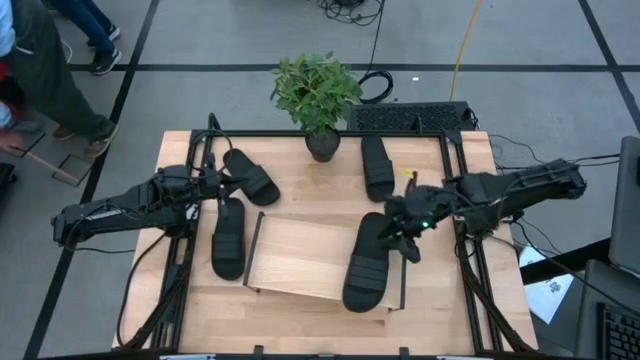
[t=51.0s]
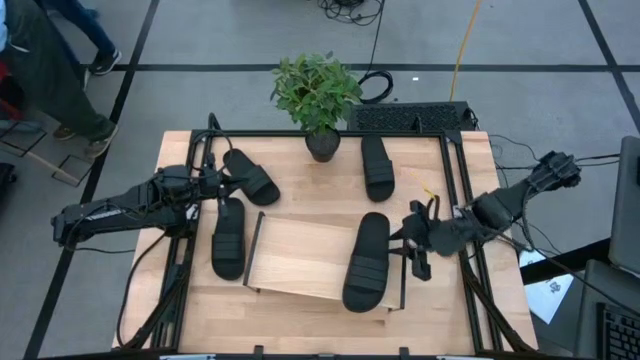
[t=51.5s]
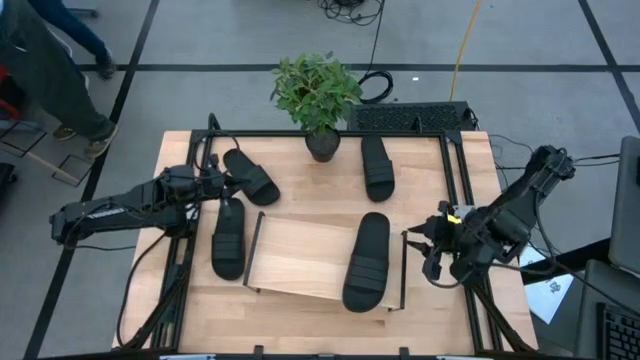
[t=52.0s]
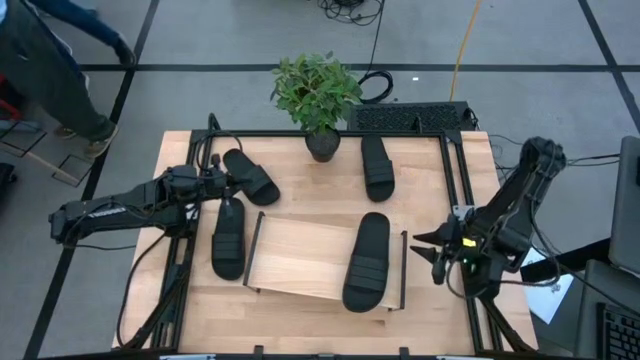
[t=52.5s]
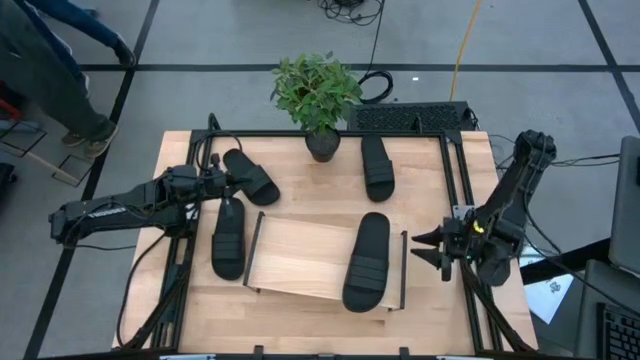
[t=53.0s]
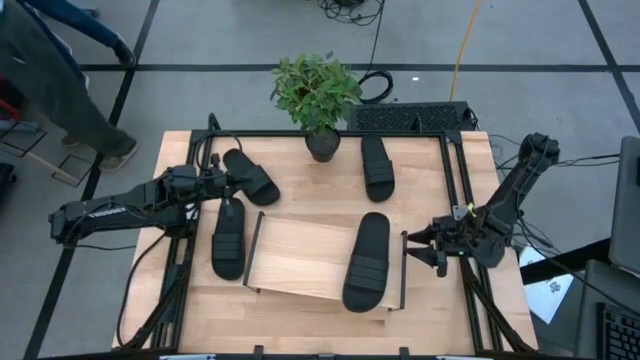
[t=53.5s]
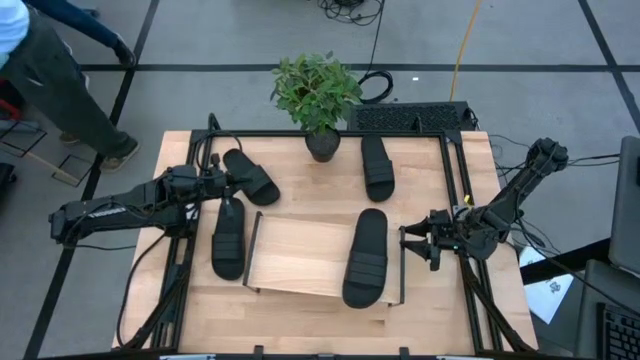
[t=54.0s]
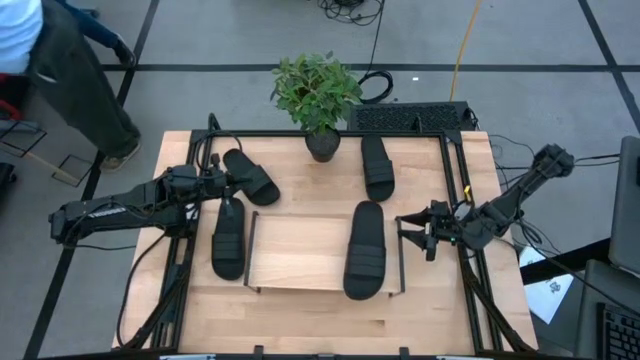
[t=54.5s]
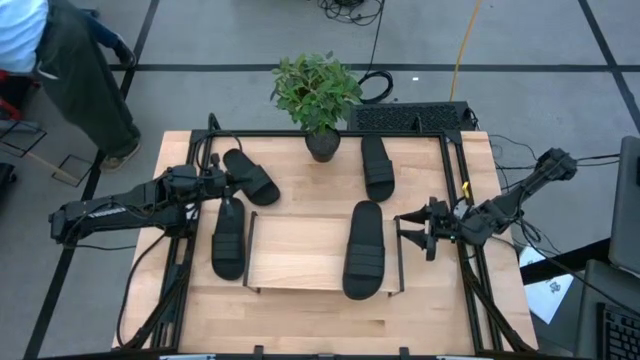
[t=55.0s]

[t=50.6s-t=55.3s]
Task: Pick and place slides into the shelf
Adjust the shelf

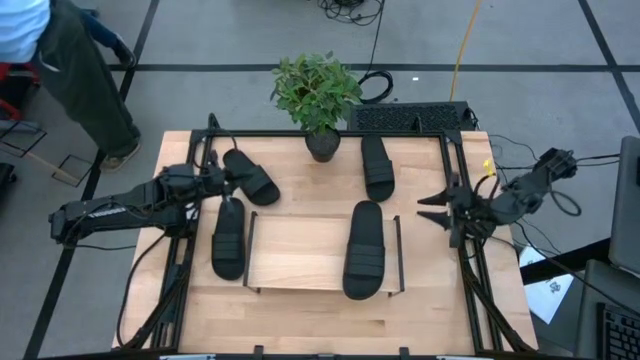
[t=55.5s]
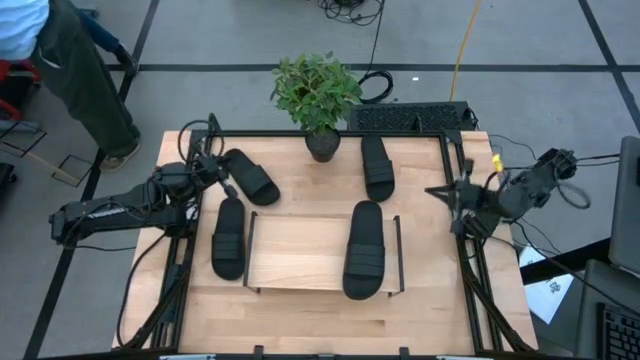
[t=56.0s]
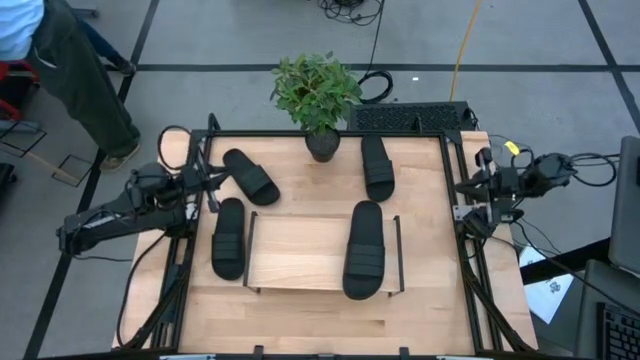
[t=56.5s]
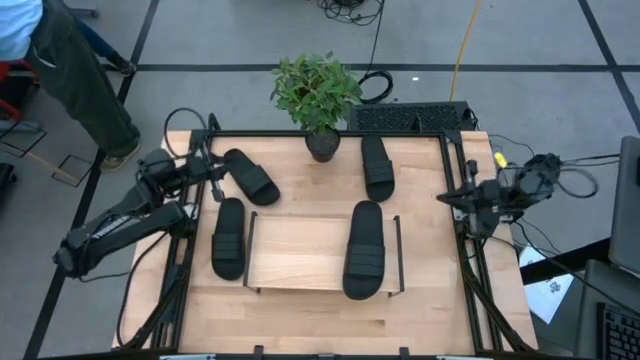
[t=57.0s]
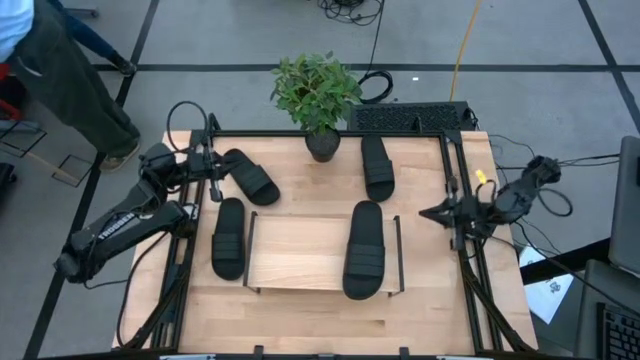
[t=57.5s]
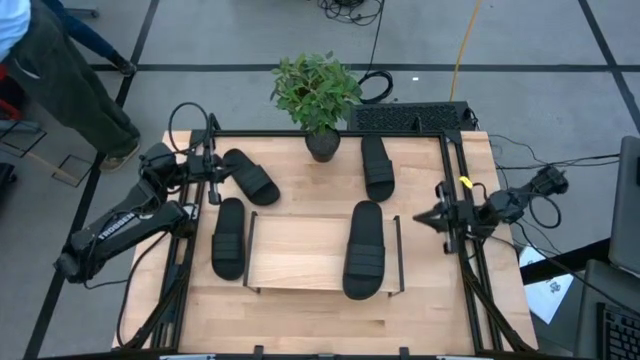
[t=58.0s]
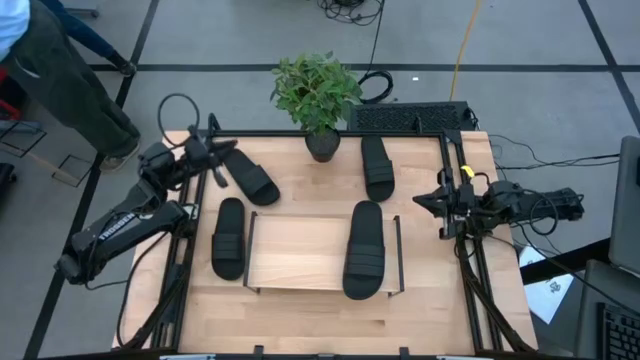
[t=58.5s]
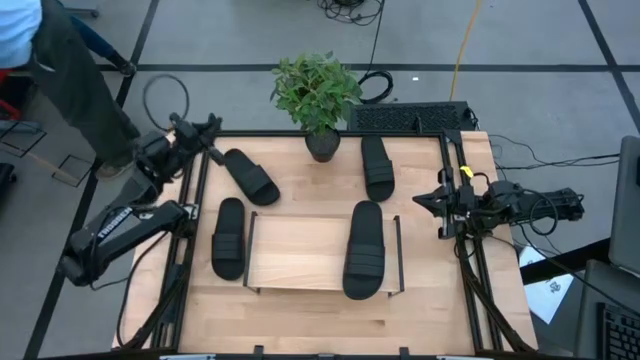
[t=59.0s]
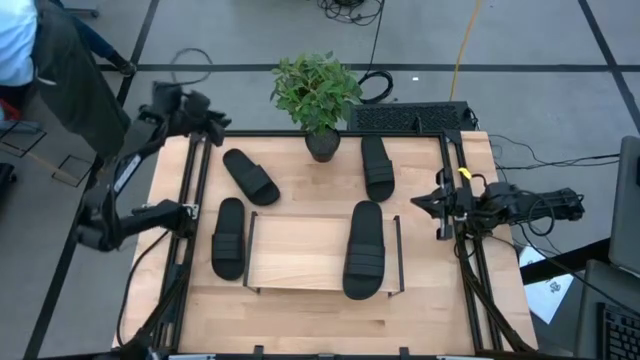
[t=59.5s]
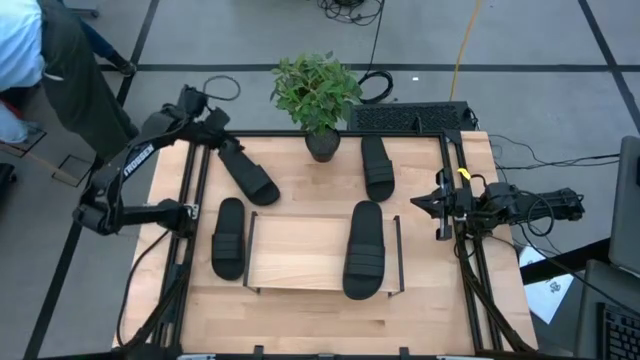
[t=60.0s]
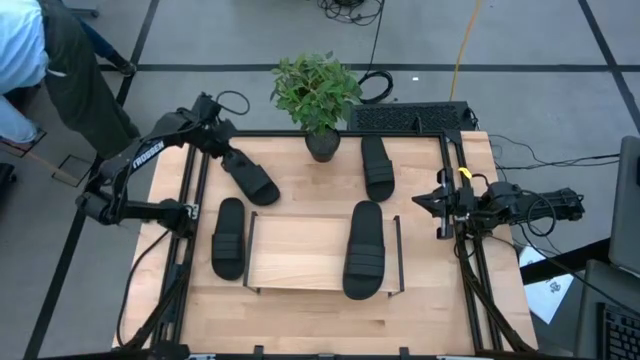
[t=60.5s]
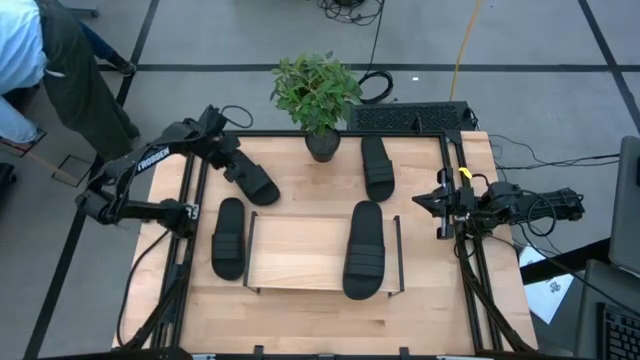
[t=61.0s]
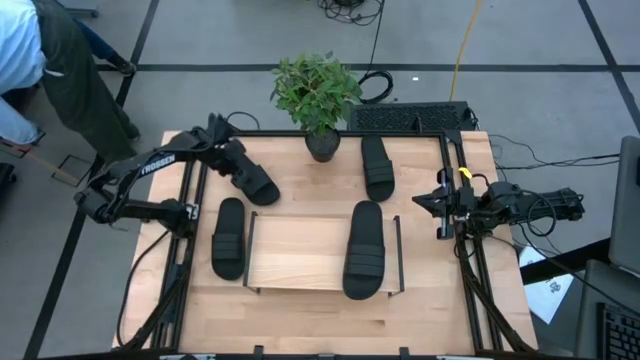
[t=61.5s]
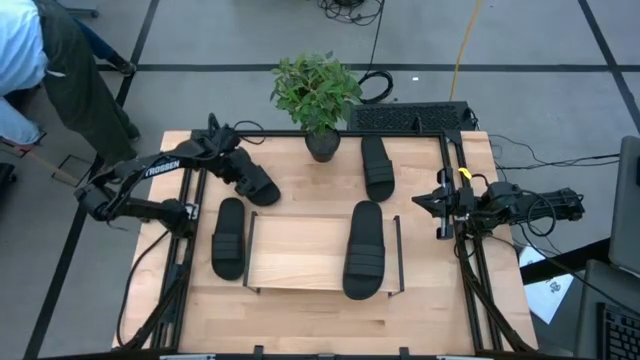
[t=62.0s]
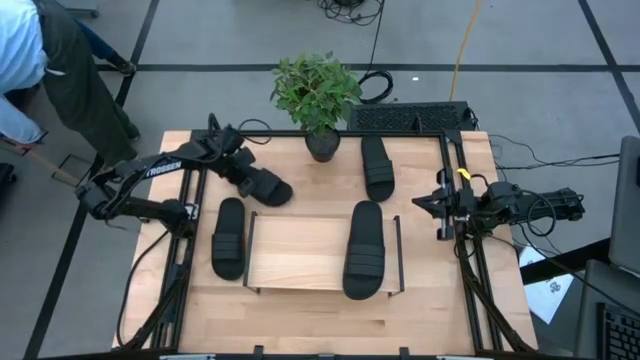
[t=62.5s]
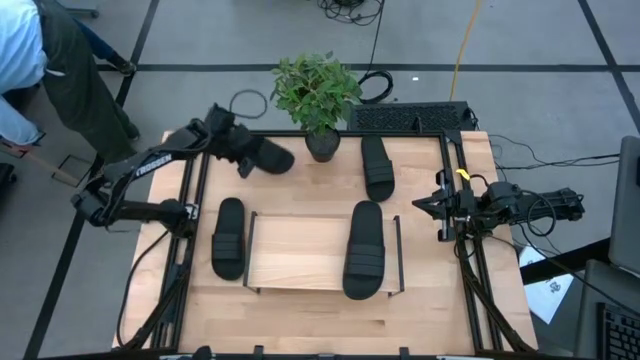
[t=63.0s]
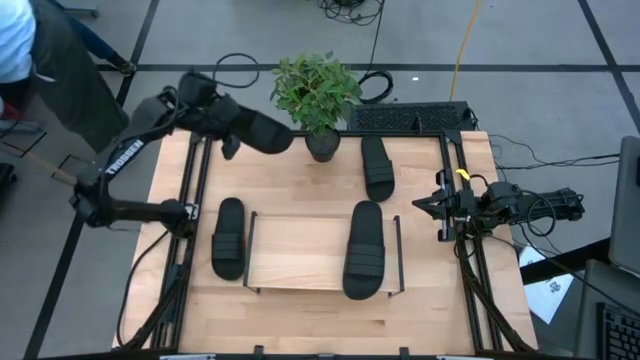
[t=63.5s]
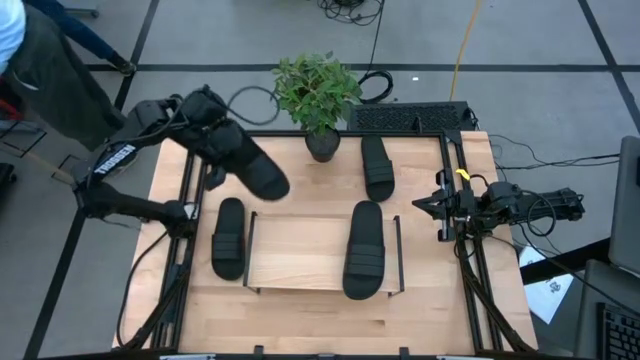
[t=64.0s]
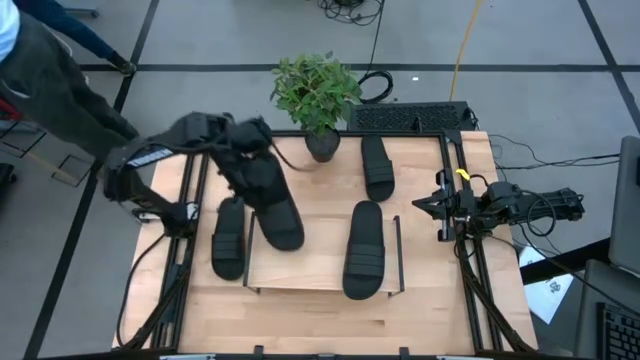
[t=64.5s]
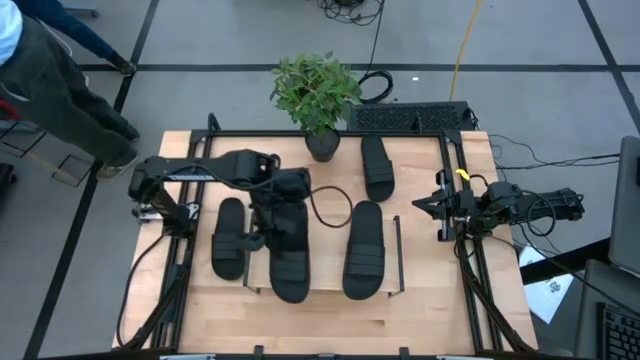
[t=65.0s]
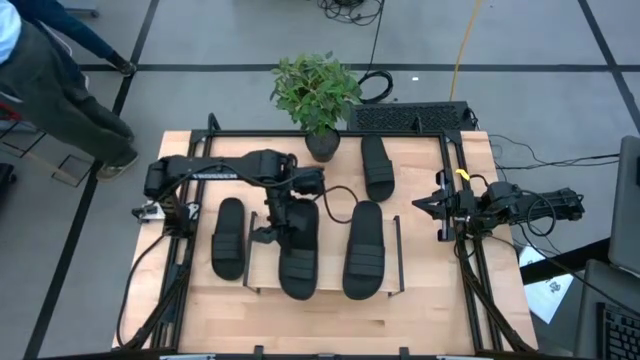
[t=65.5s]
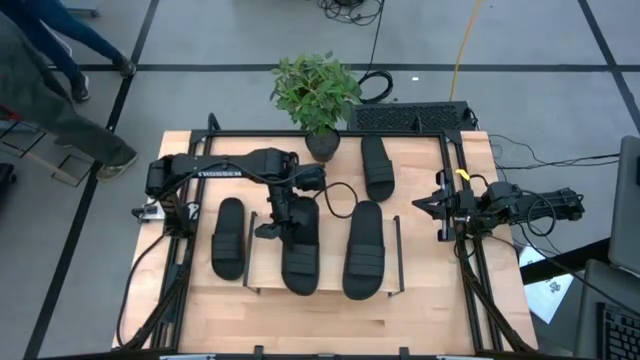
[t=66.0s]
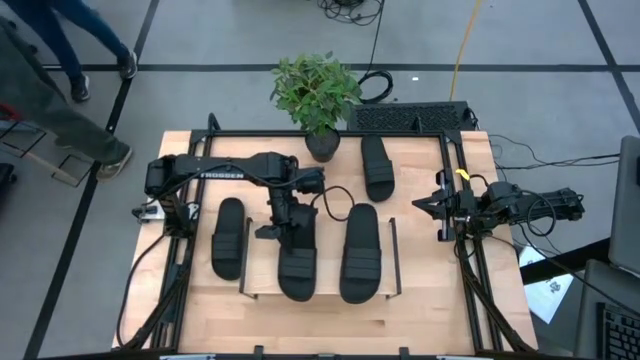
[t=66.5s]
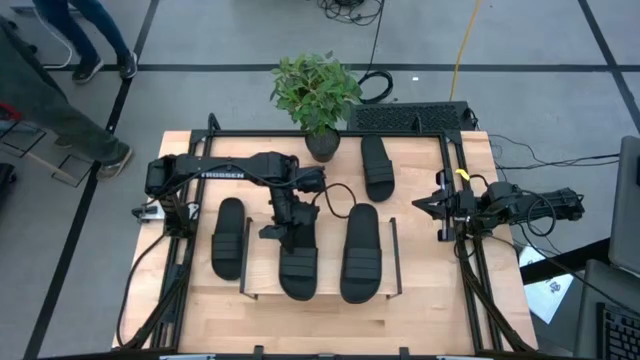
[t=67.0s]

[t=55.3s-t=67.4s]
Put the black slipper on the shelf

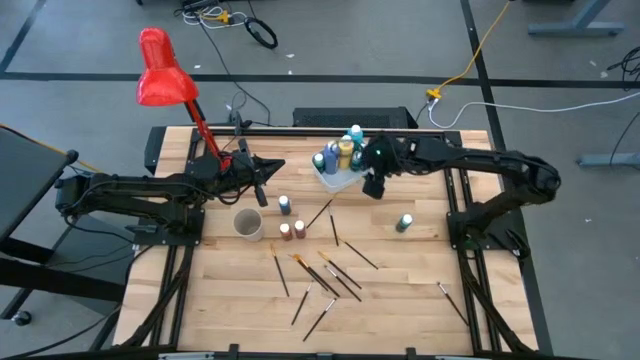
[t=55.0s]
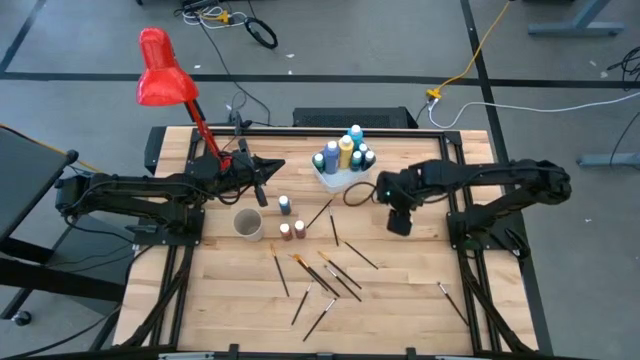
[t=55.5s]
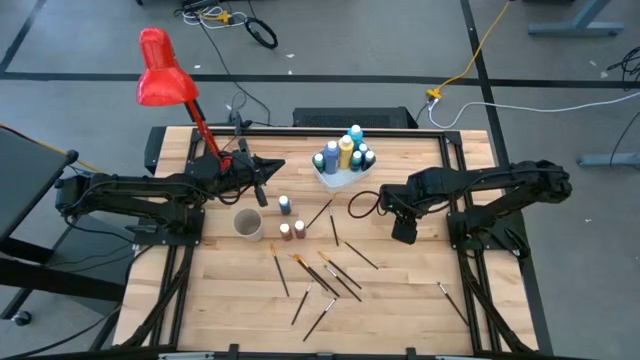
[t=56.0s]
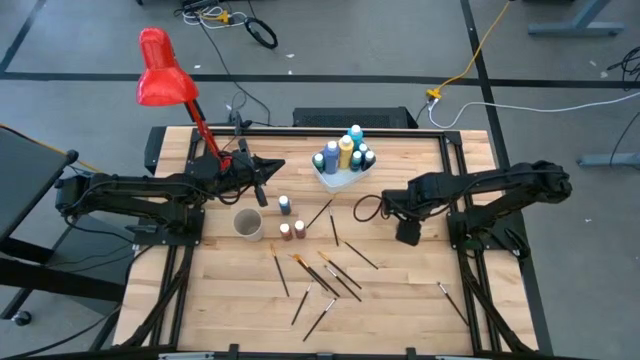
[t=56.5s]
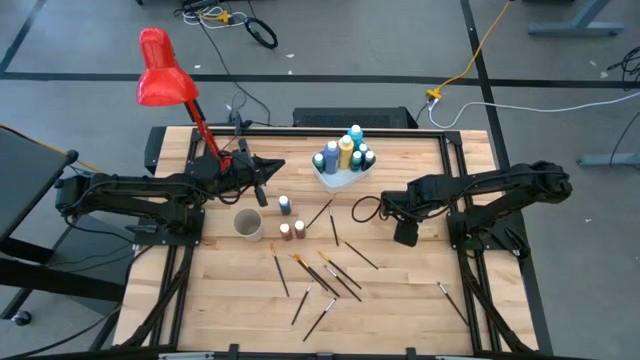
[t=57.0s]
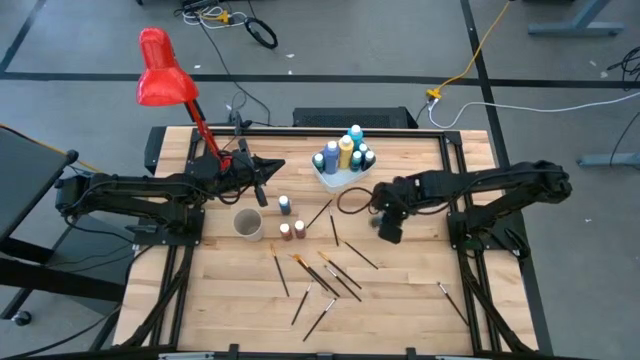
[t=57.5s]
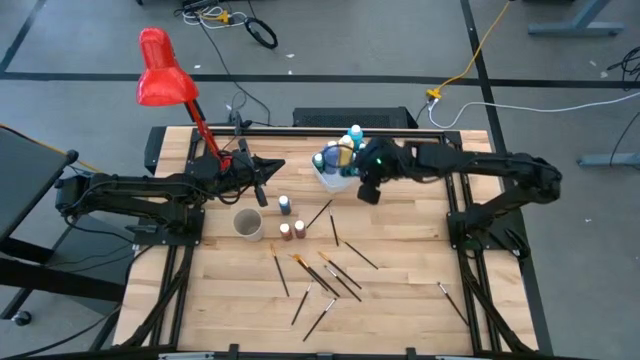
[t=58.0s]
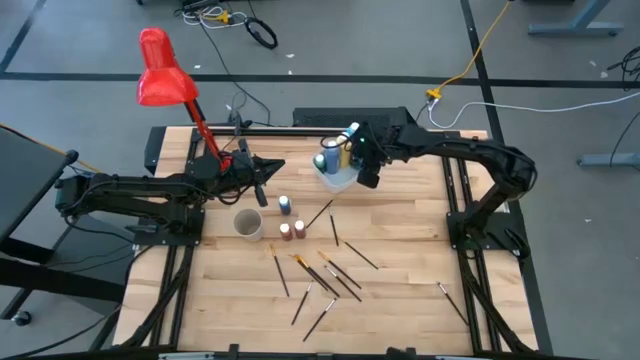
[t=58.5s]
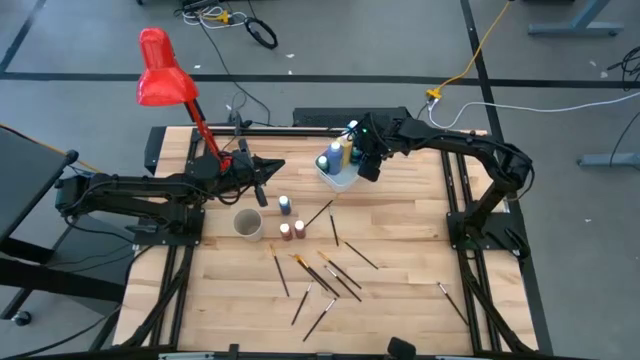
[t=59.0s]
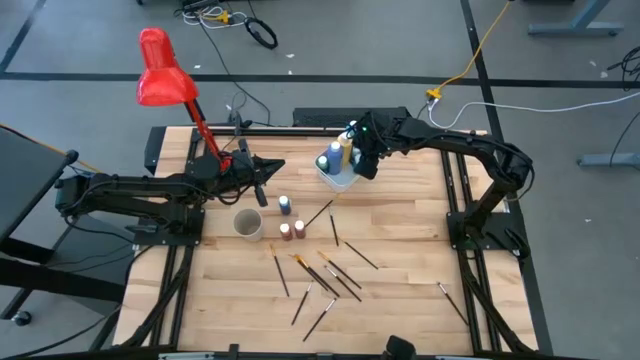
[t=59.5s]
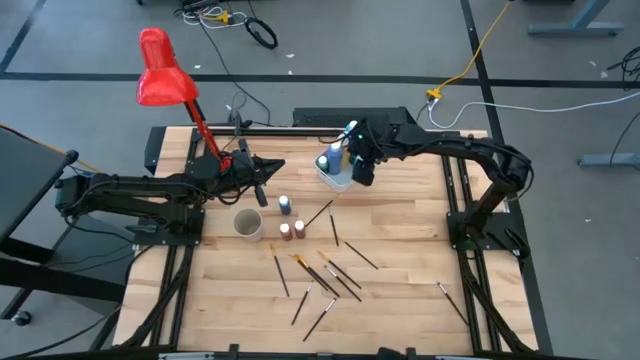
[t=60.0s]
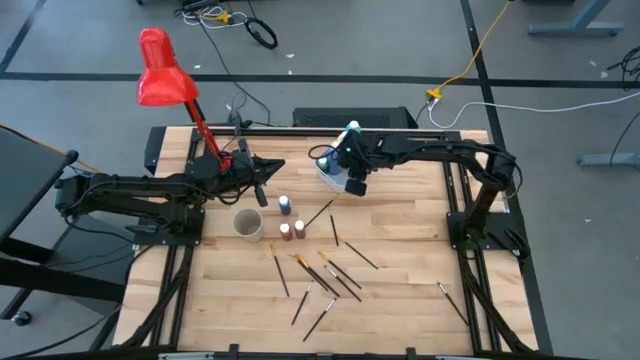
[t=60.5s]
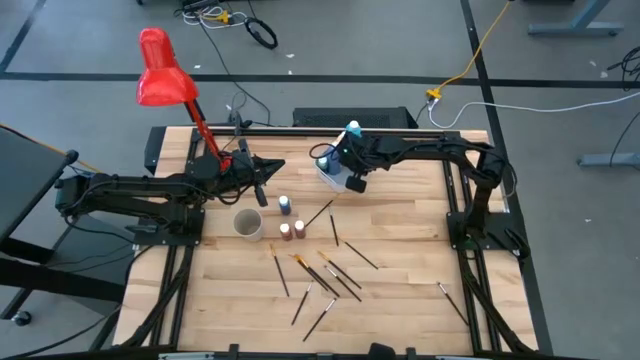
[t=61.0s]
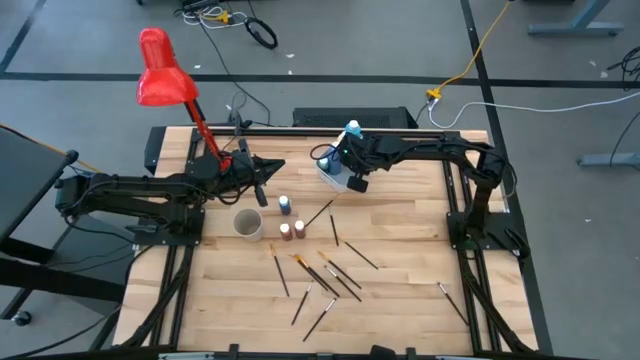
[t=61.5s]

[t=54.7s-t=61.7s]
Task: Pick & Place Paint Supplies
Put the small light green paint bottle into the white bin
